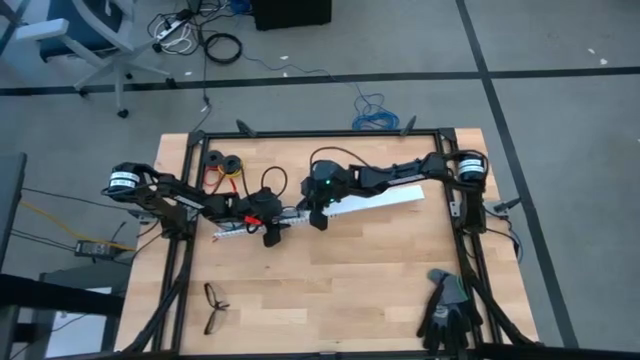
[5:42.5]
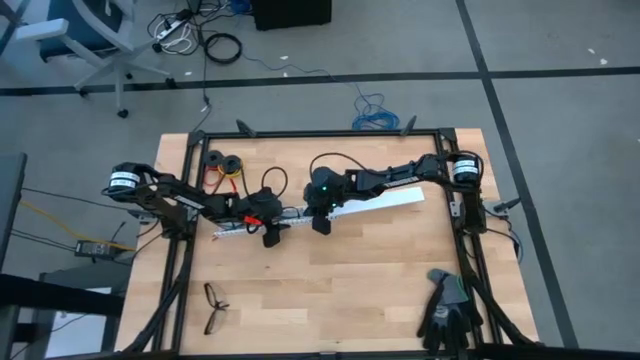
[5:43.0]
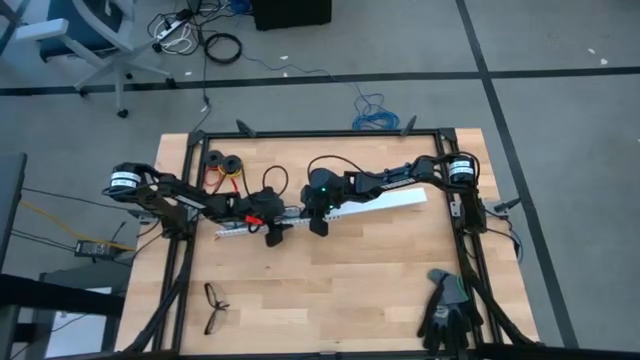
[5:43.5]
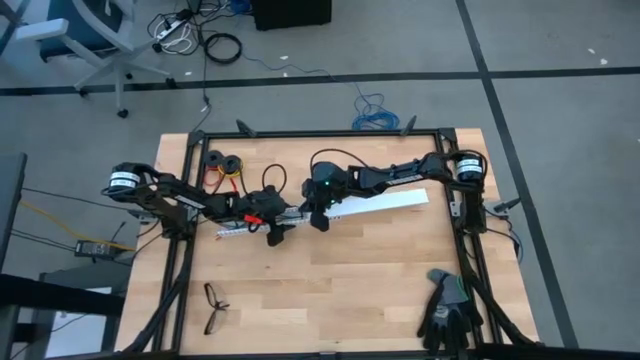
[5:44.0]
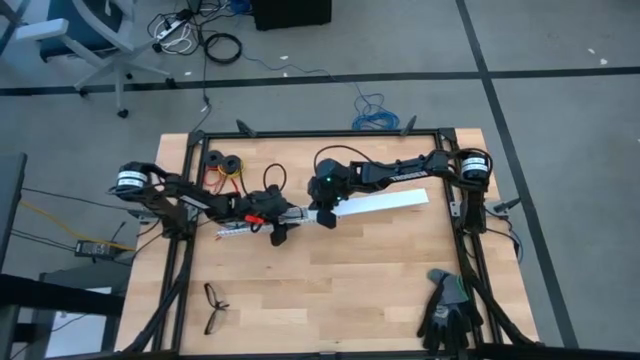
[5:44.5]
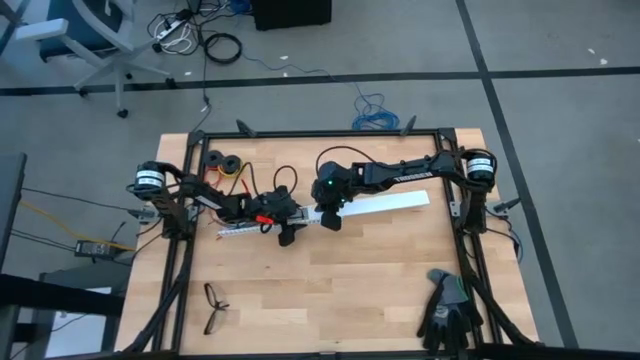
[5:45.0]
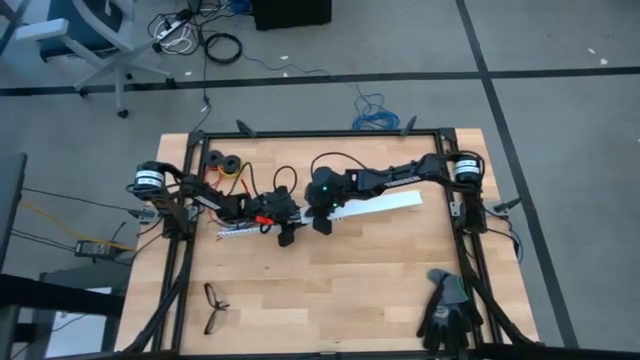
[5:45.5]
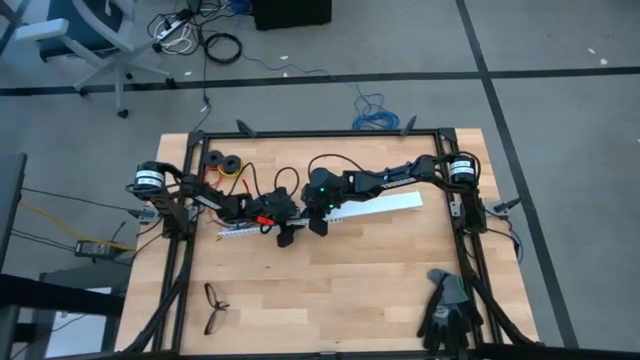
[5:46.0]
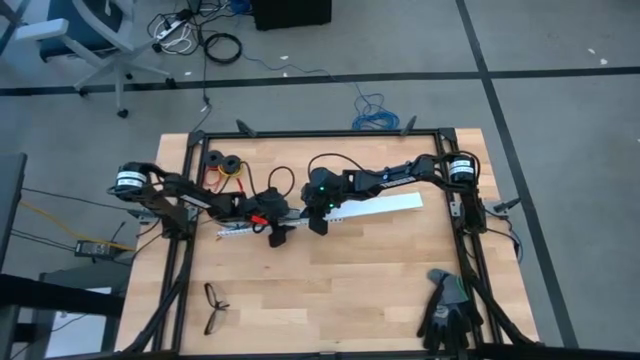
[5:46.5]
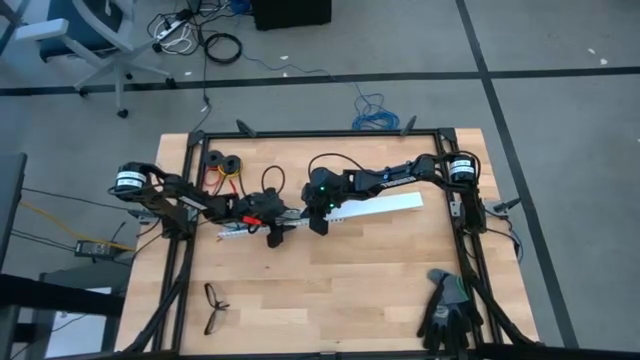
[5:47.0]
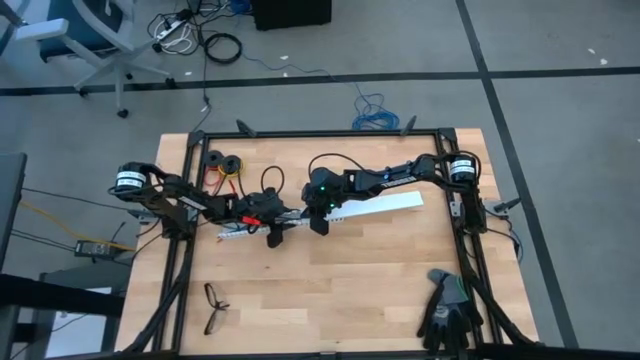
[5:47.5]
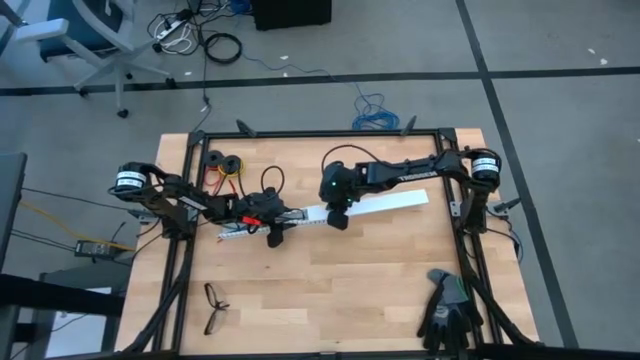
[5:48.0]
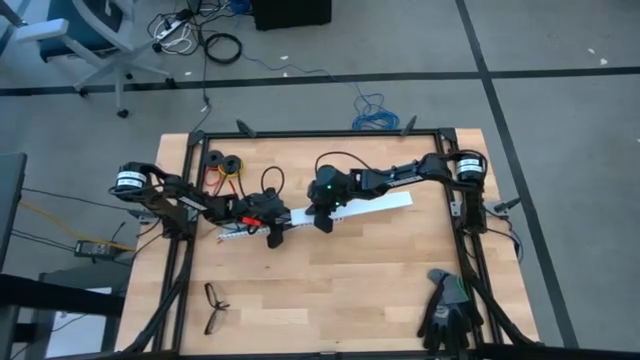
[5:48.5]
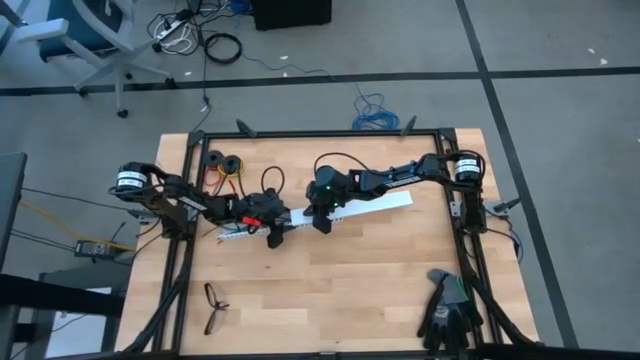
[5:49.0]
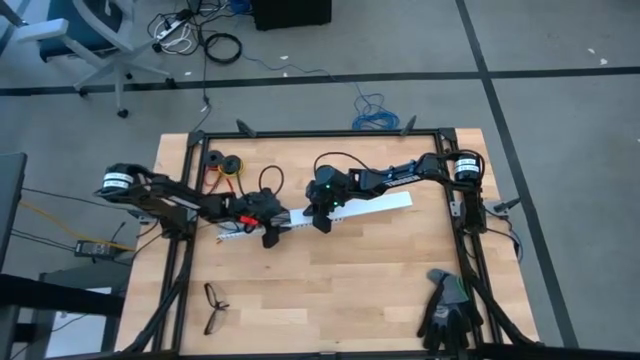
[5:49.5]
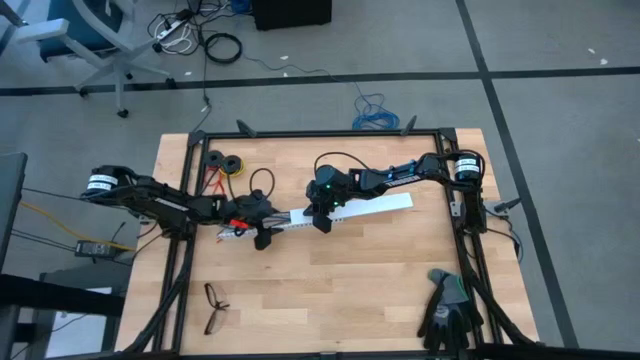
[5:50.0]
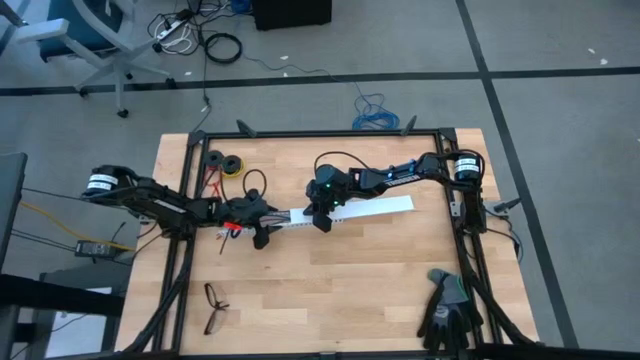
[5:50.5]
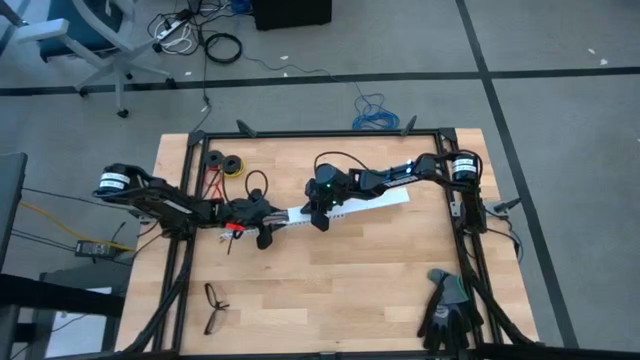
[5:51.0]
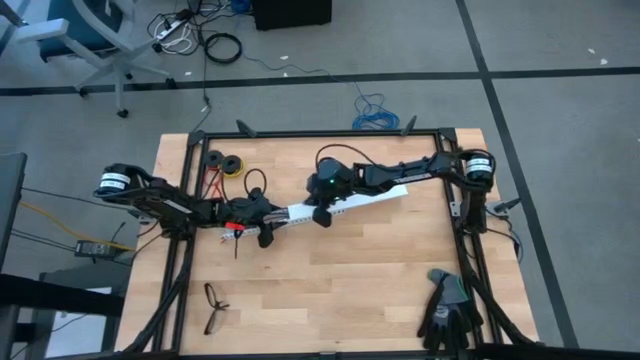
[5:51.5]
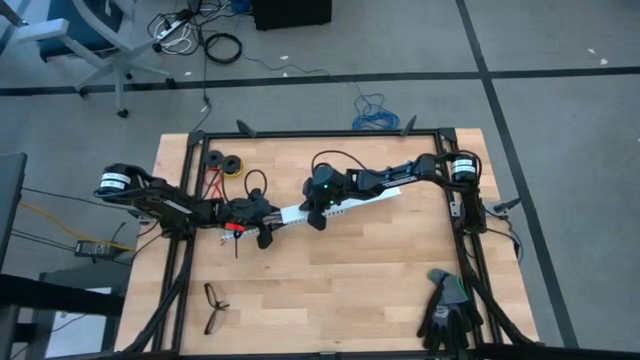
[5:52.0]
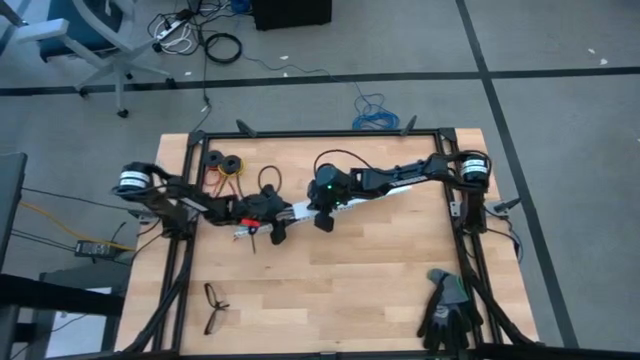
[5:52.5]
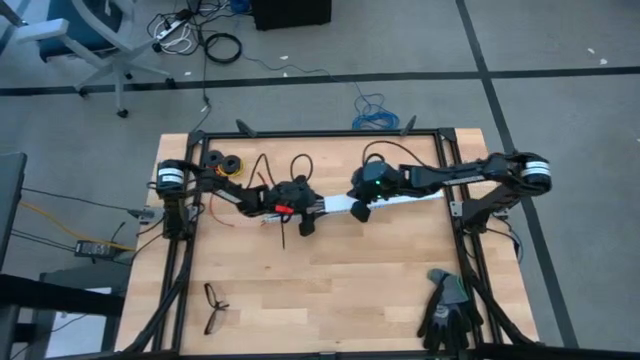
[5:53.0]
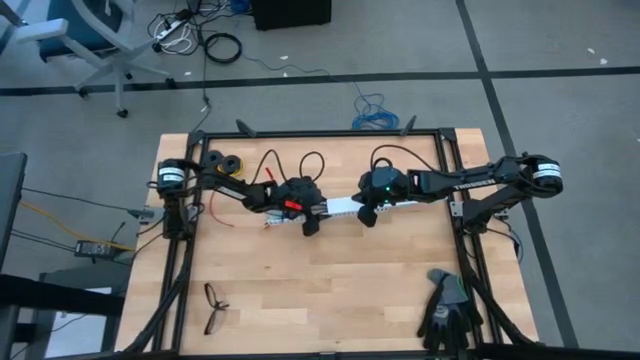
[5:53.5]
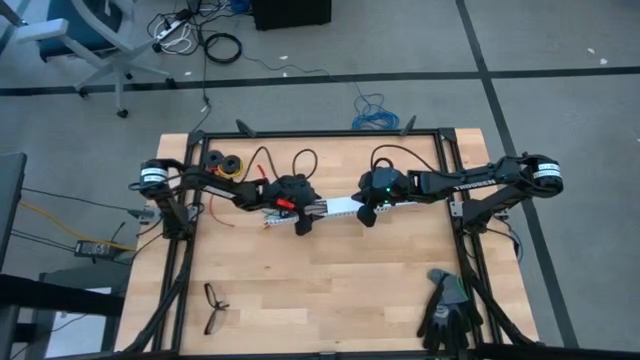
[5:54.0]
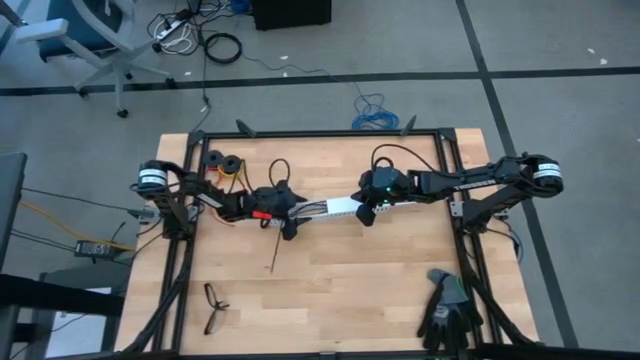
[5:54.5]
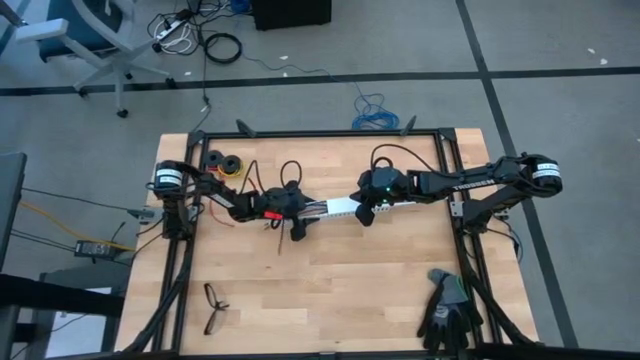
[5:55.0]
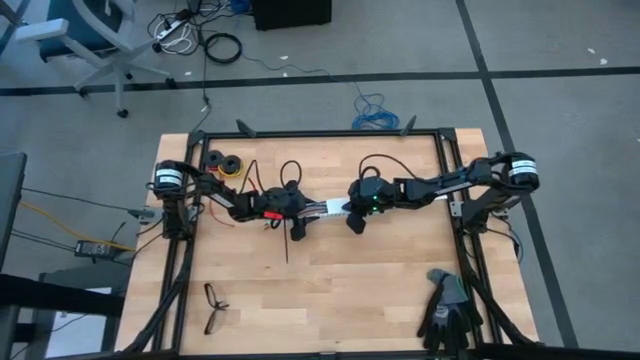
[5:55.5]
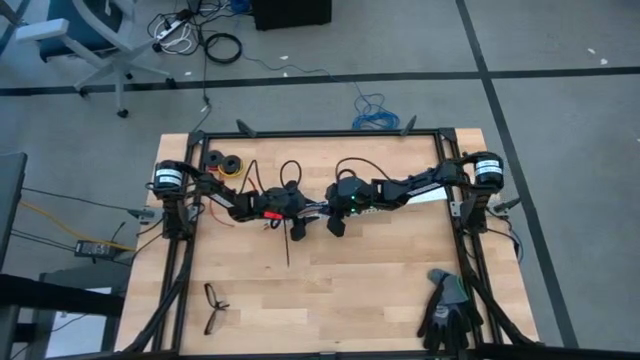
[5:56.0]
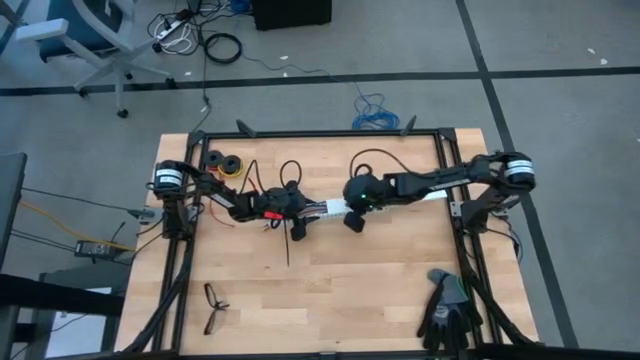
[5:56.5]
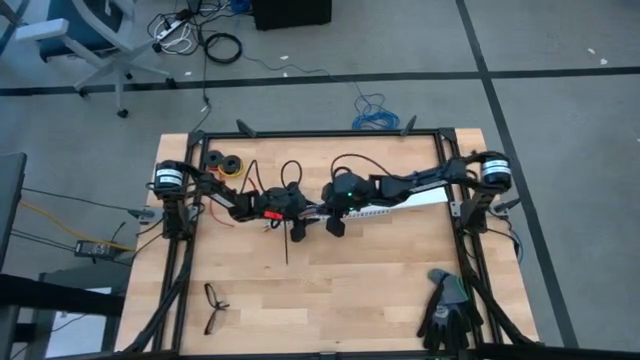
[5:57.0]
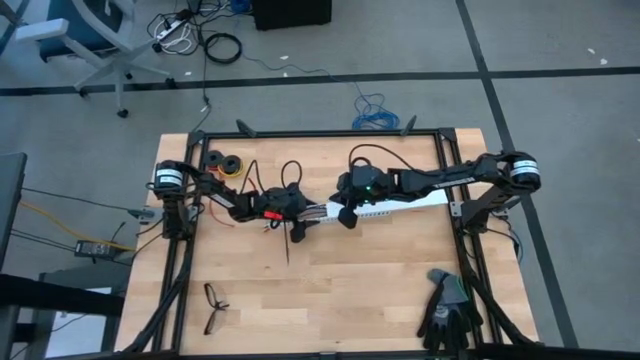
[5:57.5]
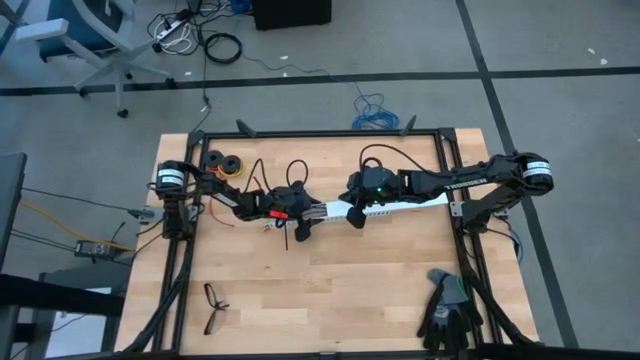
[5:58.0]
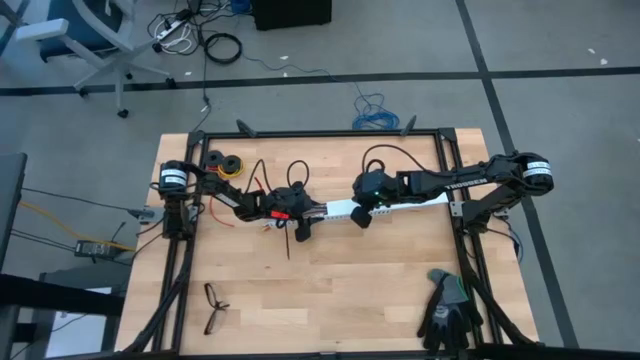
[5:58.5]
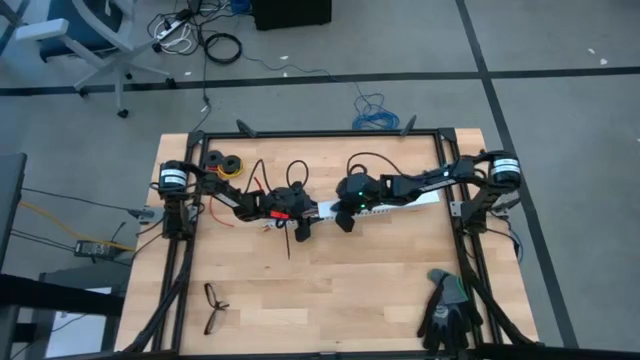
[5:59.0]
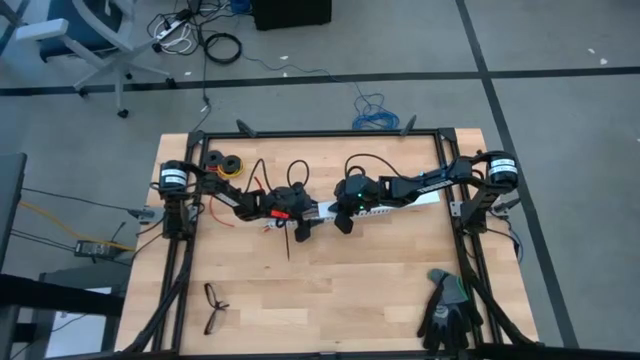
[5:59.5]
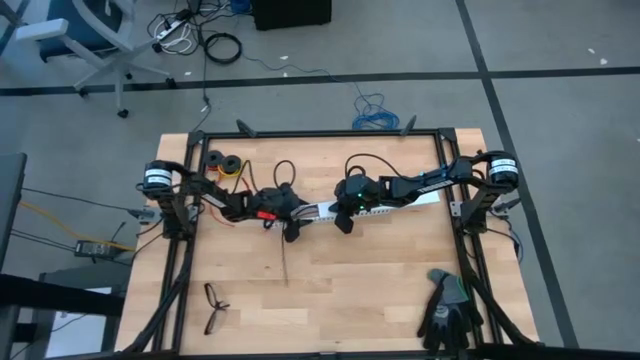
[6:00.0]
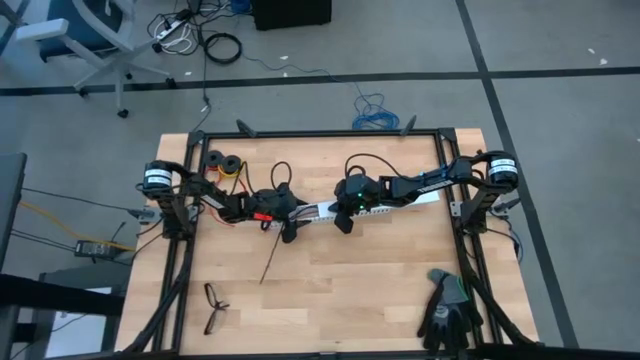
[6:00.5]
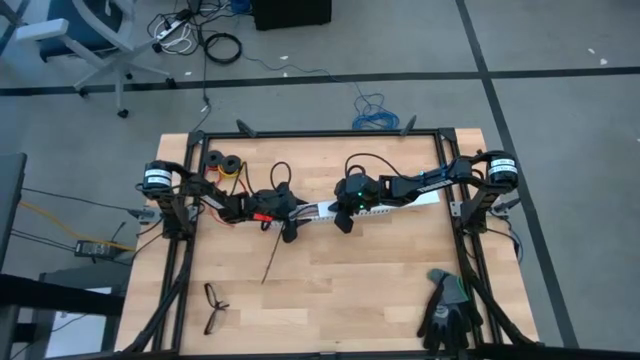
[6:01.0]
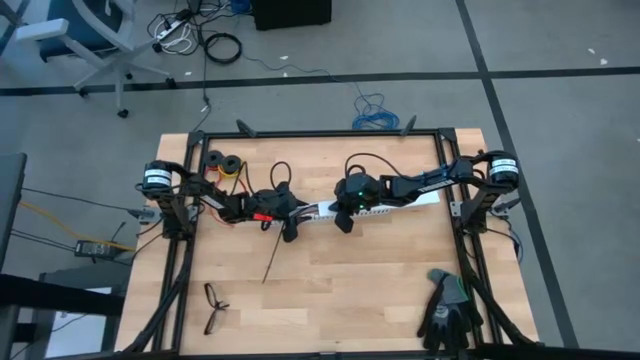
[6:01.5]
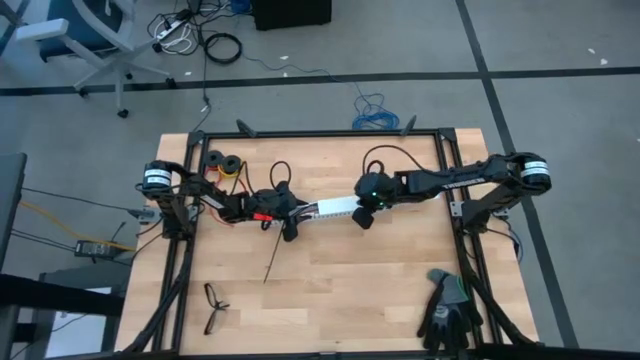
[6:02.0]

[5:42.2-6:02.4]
Task: Ziptie cables
Close the white cable duct
